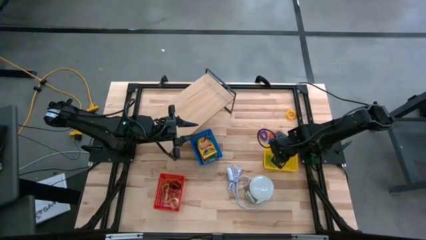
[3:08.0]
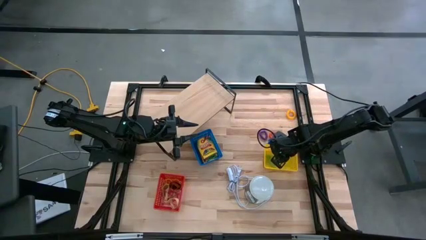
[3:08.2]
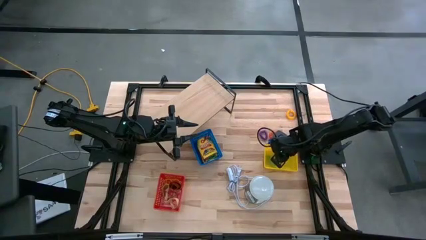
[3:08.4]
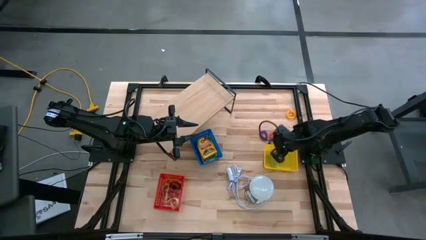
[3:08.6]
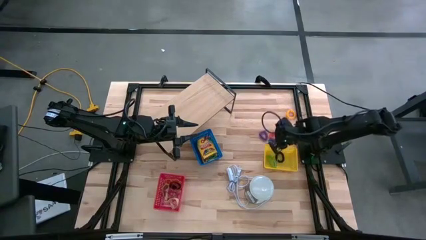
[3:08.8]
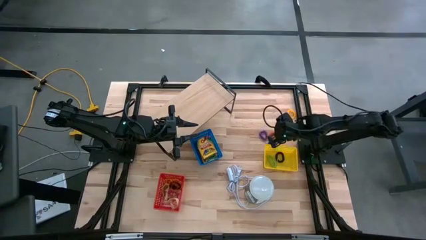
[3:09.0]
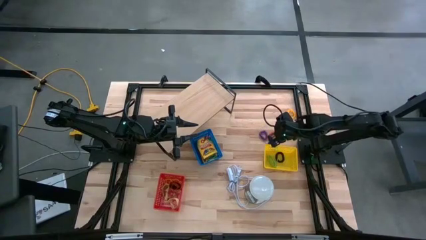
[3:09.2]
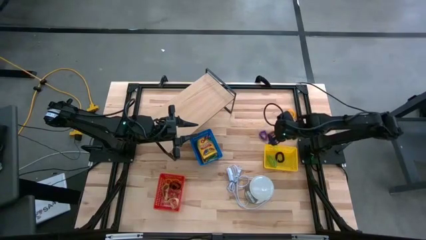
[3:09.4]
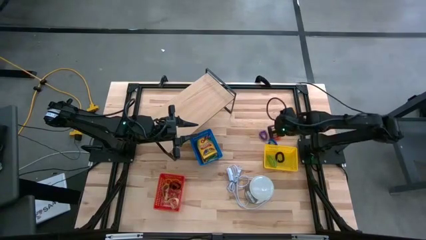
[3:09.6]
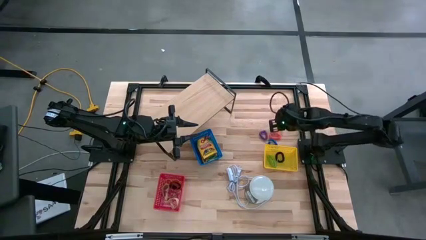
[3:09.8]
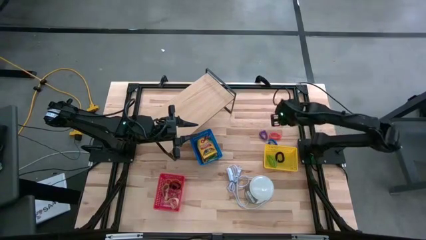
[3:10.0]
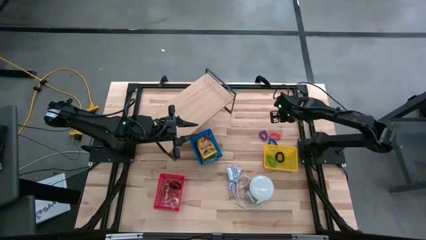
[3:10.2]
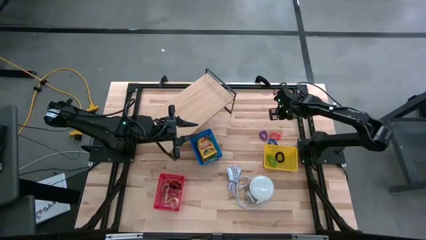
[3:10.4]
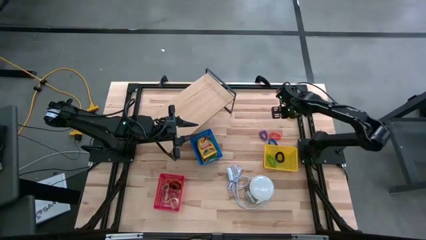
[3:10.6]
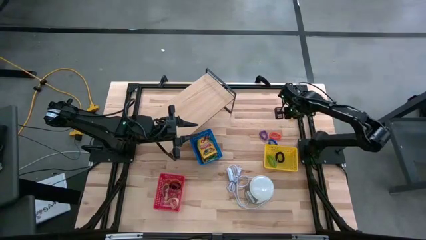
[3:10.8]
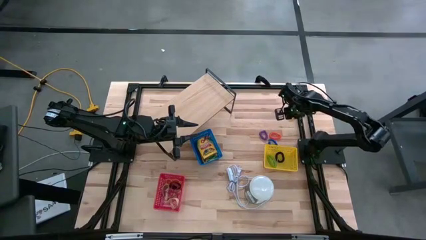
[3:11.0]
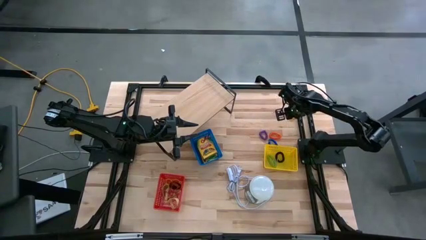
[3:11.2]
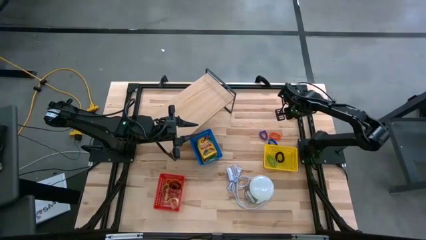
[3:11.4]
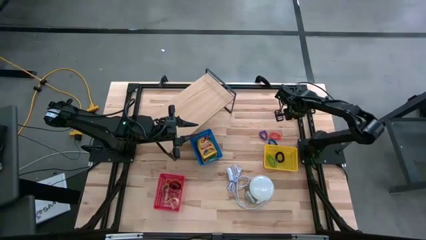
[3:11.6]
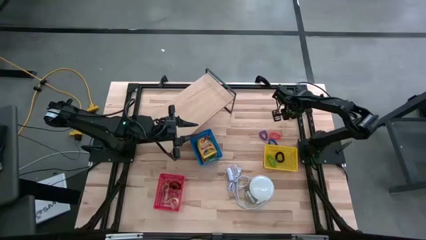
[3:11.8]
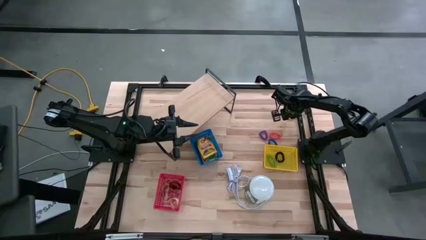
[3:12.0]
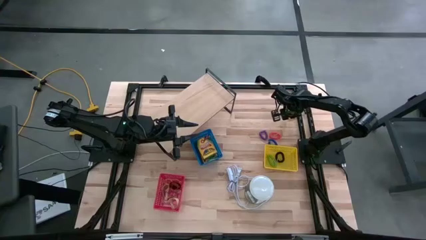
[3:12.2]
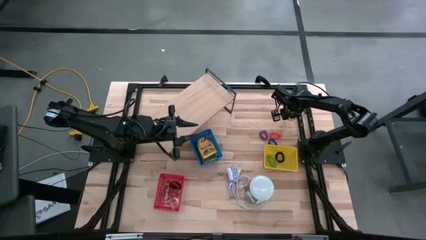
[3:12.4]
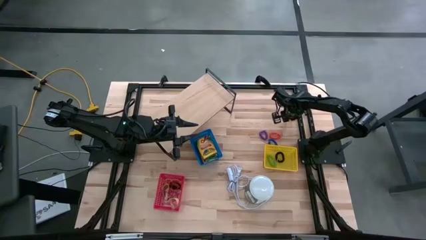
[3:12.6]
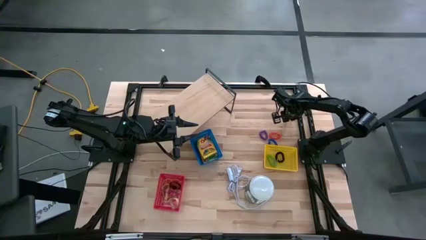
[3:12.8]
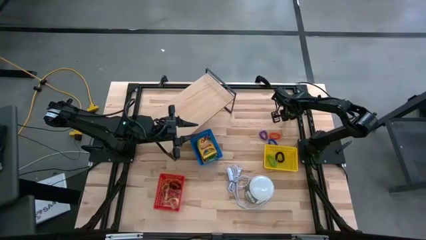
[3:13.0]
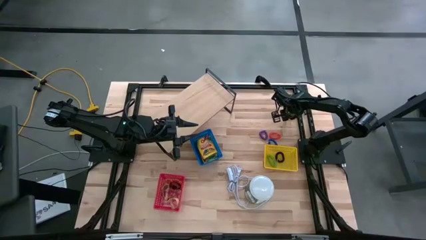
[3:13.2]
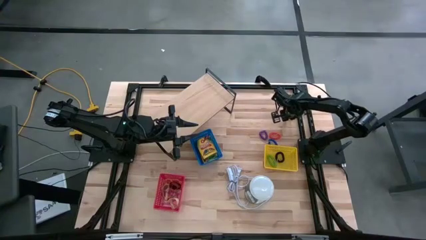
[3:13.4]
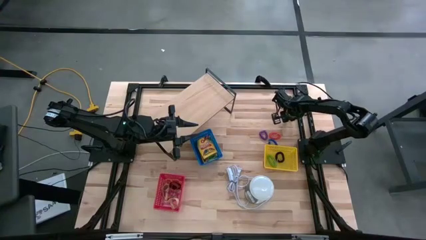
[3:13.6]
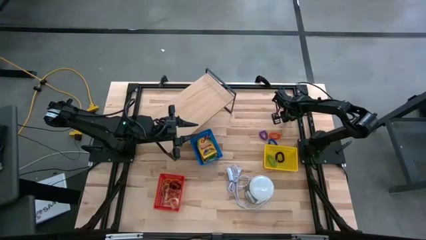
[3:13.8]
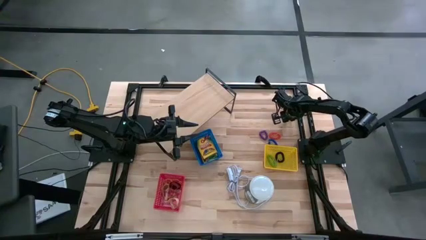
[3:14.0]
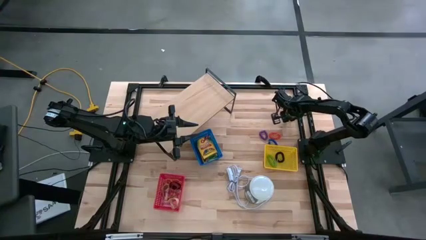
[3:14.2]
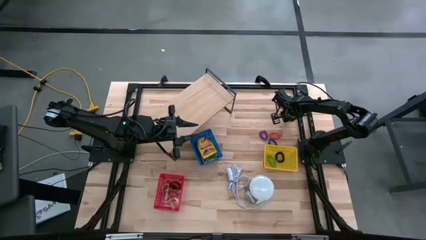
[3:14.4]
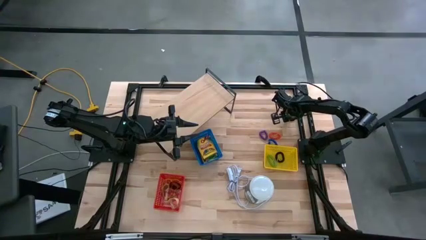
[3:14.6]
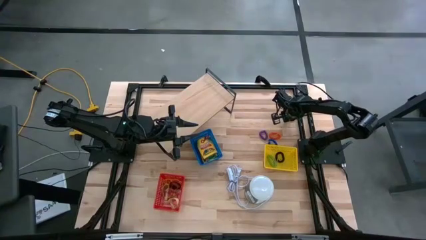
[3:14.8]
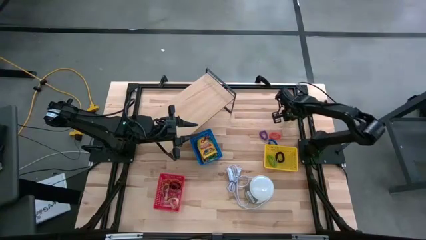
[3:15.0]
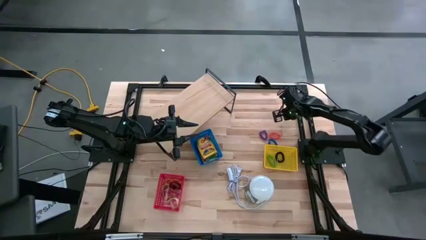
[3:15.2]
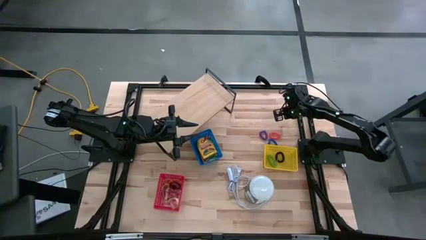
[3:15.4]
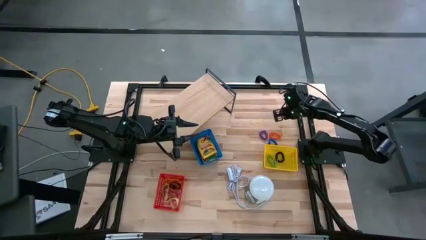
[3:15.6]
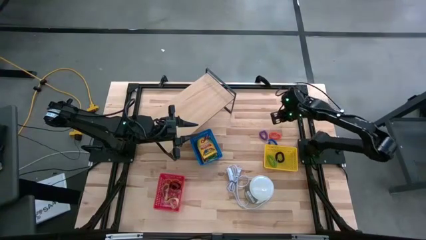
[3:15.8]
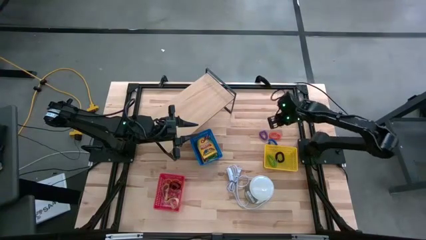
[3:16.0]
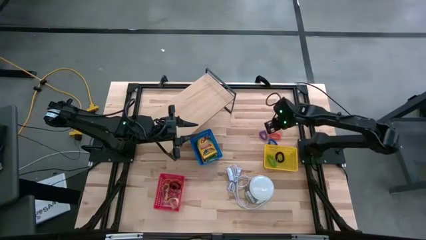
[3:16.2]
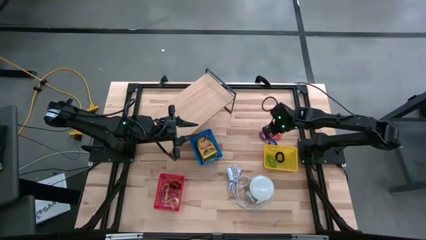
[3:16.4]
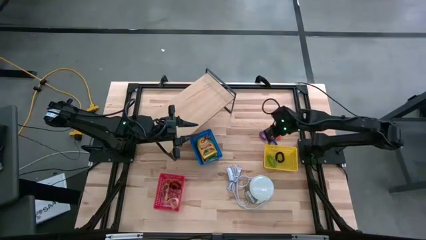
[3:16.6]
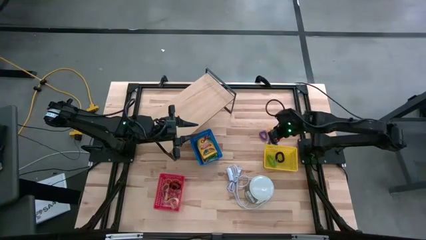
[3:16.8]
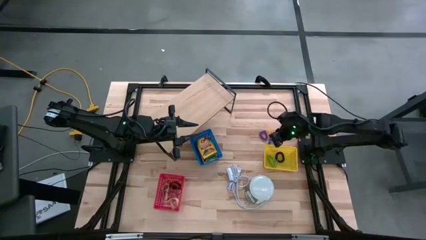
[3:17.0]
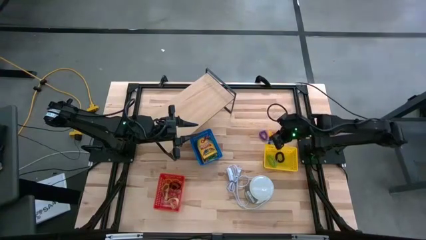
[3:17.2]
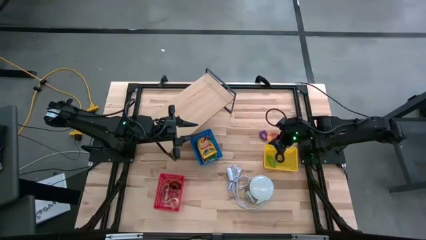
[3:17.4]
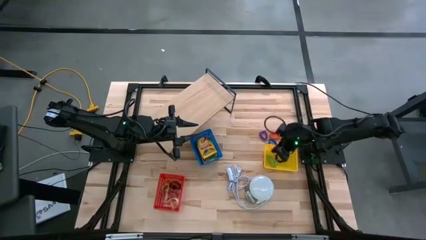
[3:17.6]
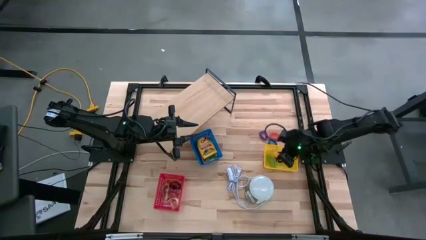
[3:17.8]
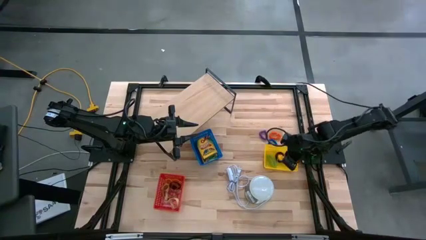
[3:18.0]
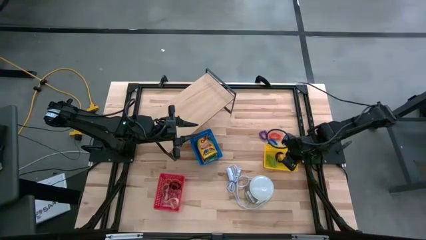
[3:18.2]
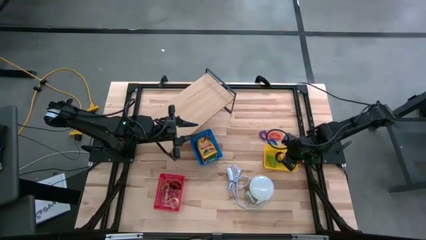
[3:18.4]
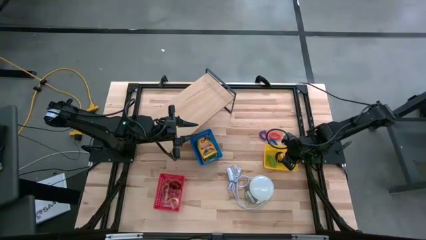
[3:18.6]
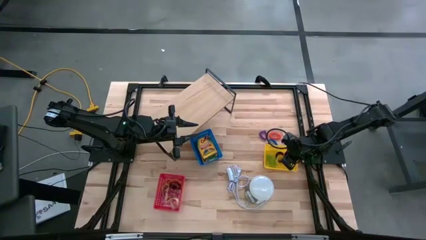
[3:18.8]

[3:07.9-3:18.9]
Task: Pick & Place Office Desk Supplies
Put the yellow spring keychain into the yellow bin

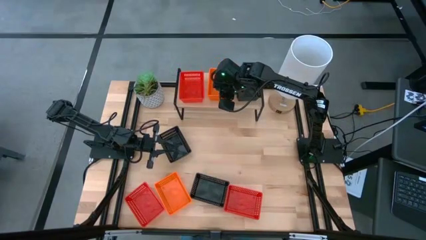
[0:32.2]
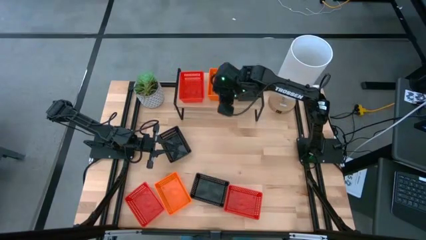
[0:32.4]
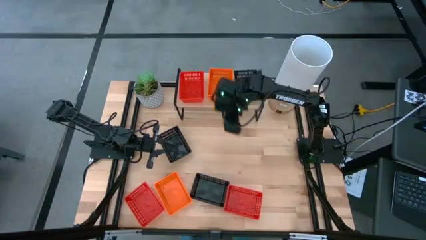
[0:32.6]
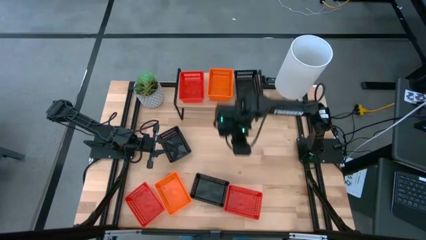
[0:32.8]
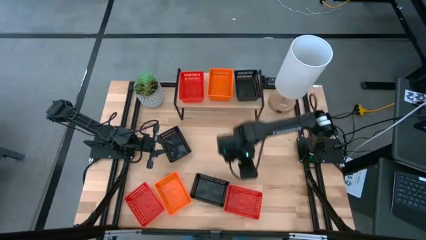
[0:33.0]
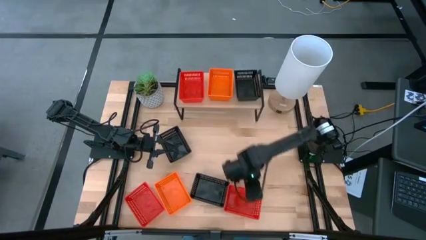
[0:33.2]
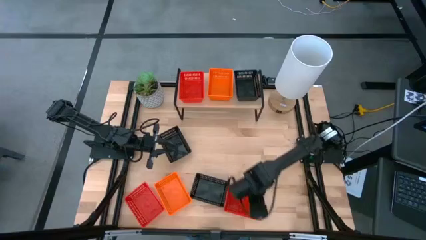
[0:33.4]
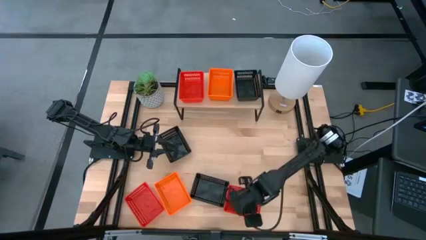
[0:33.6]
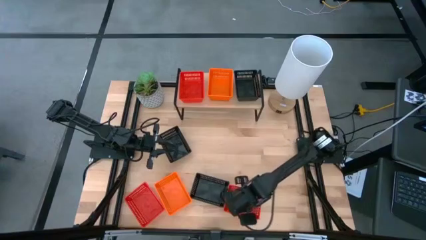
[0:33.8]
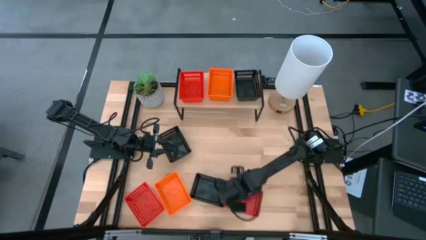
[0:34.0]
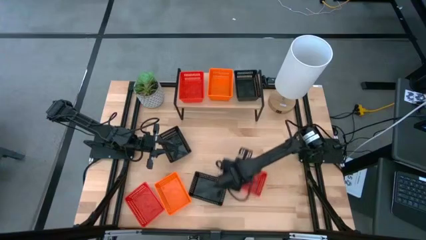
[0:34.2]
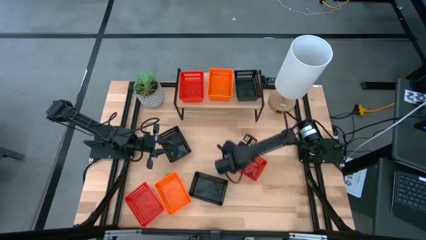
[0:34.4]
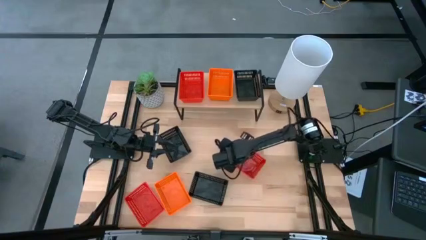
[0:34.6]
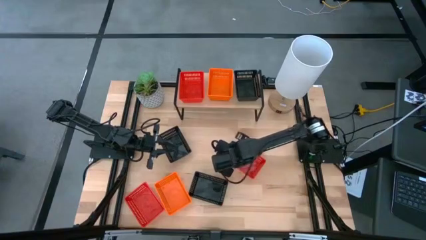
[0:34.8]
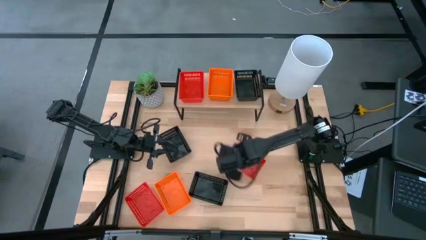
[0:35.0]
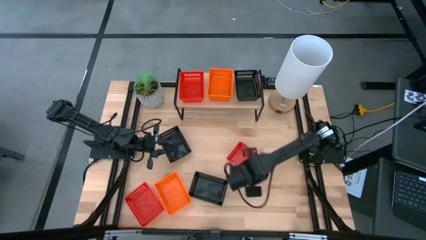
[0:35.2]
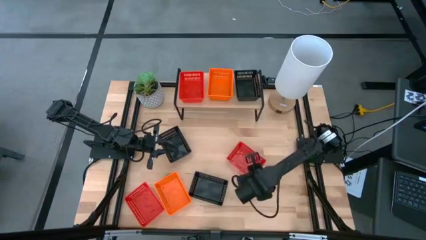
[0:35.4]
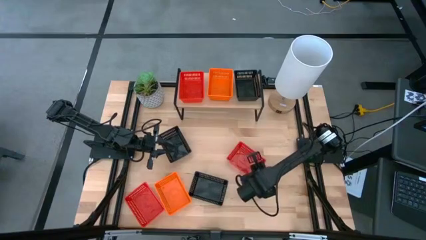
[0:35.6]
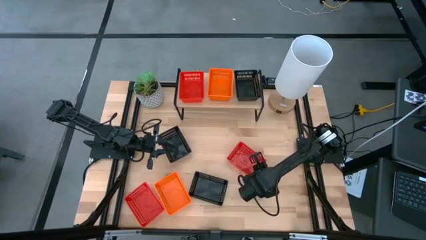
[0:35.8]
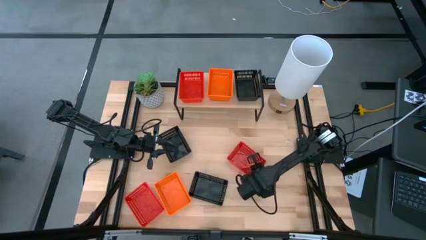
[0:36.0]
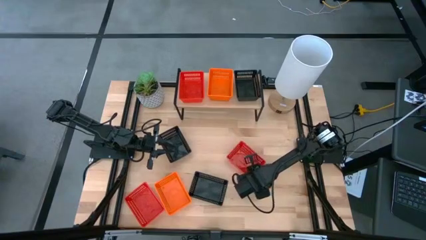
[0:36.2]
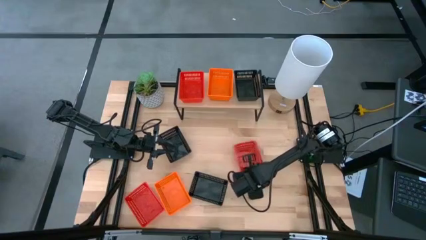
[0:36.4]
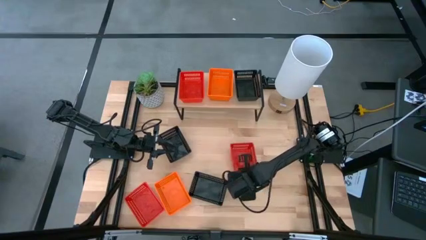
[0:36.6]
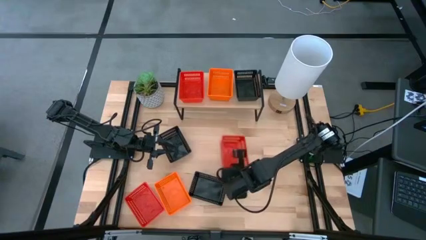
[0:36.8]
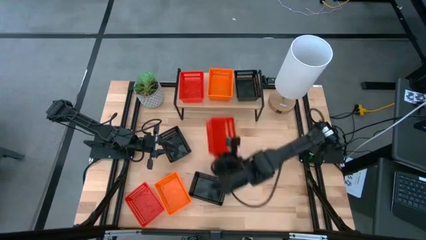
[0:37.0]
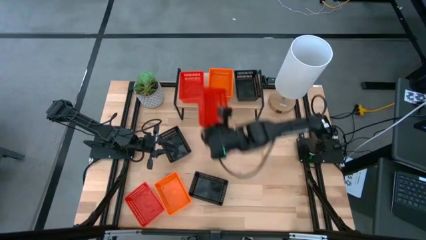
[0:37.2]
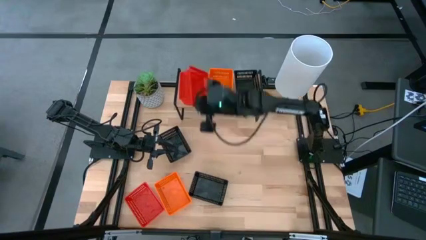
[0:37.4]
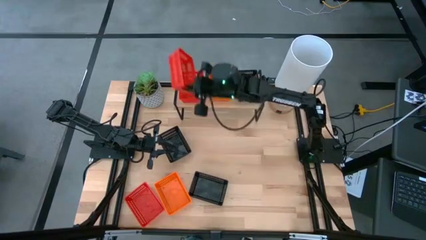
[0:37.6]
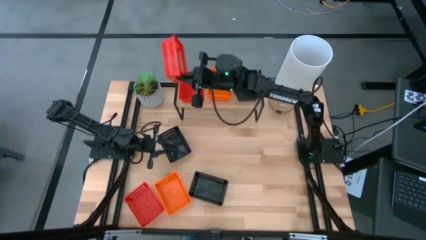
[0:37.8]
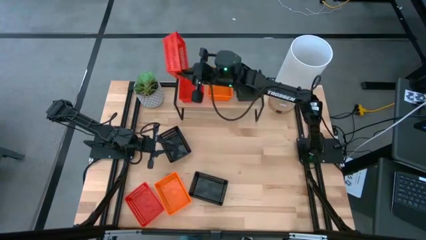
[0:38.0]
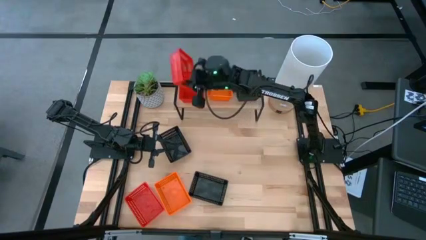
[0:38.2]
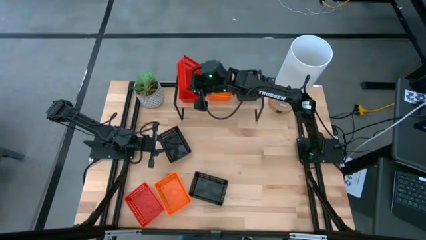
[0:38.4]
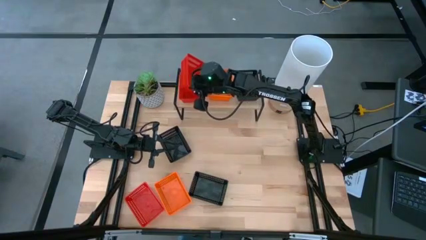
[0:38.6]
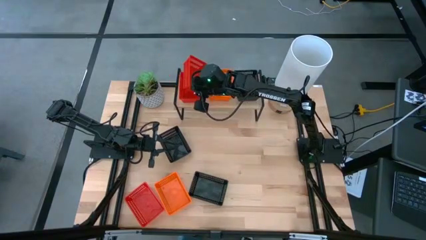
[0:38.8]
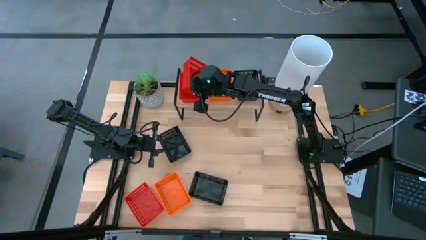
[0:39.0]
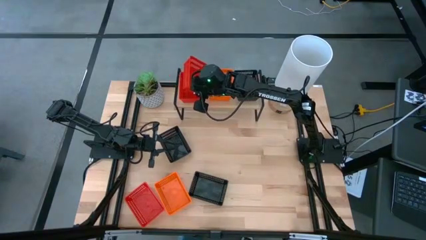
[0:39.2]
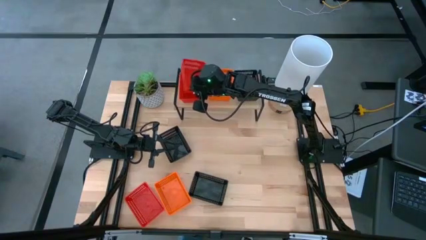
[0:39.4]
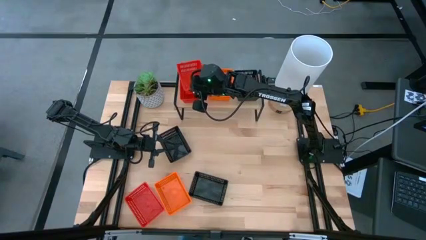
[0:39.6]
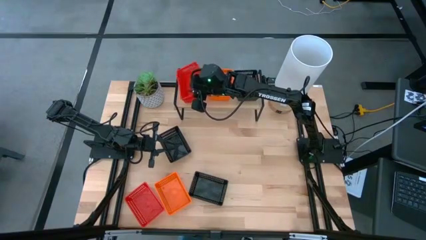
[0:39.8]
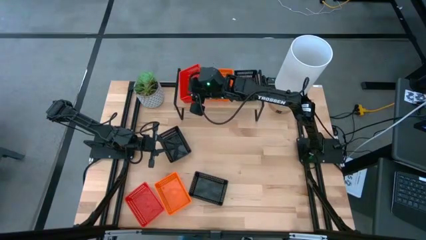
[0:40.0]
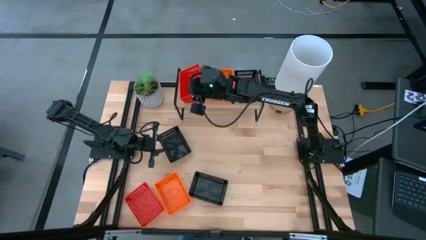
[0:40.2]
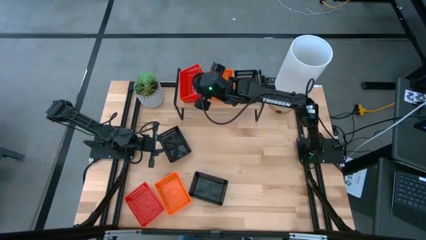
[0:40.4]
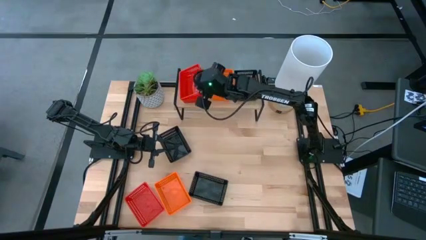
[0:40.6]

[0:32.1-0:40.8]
Task: Stack baskets on shelf by color
Stack the right red basket on the red basket
